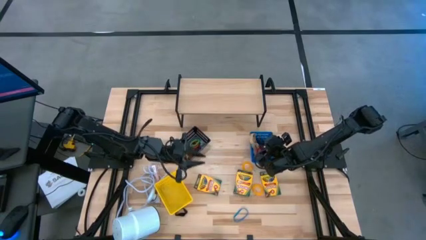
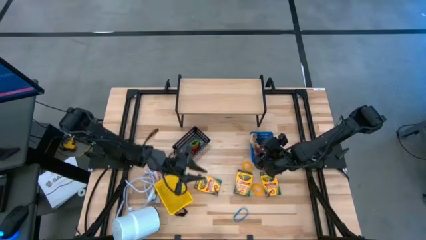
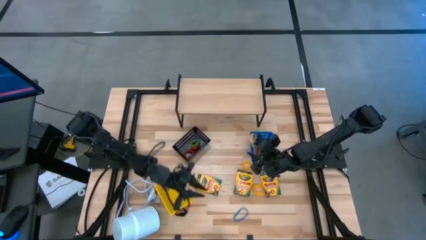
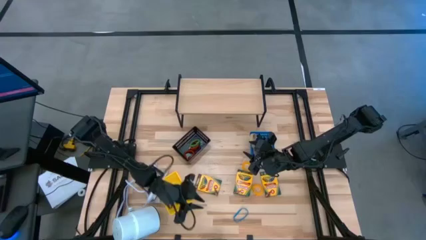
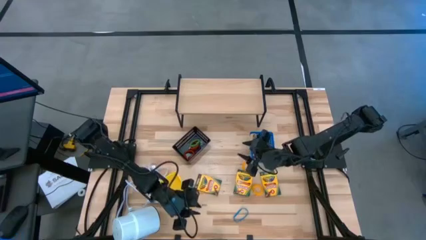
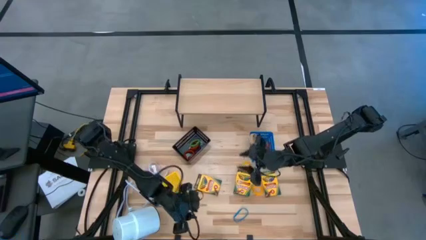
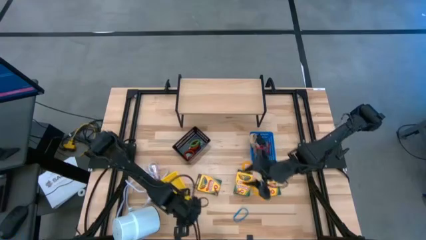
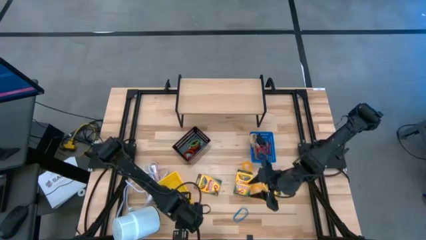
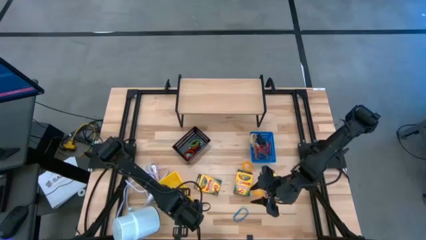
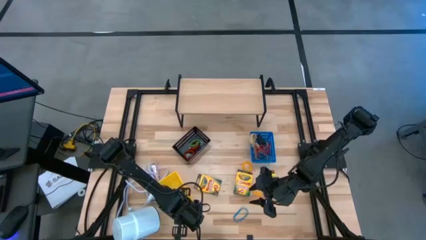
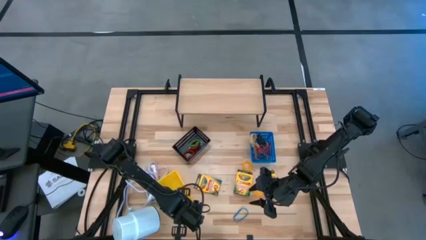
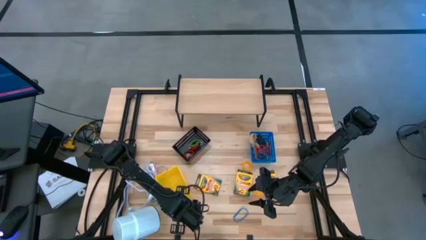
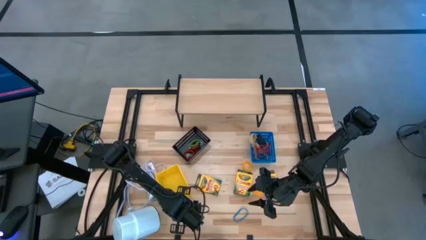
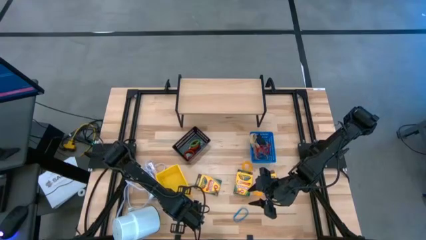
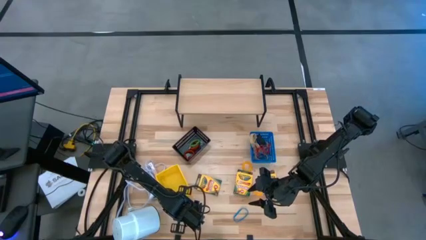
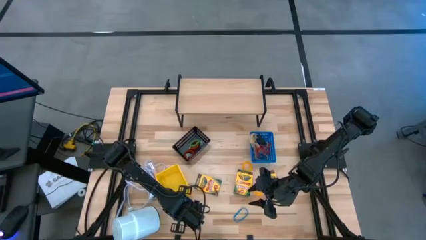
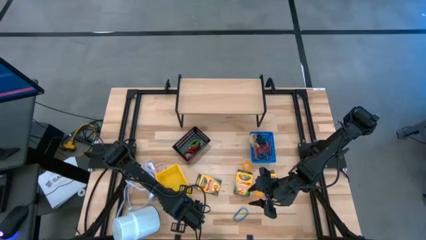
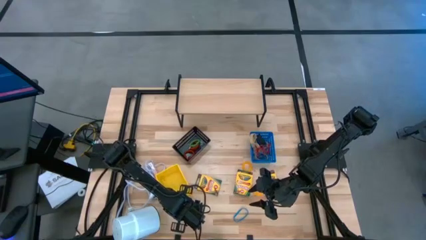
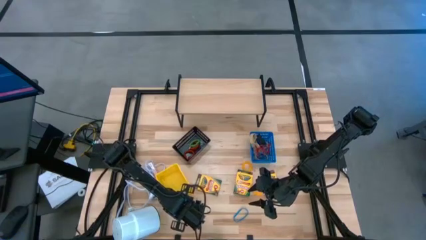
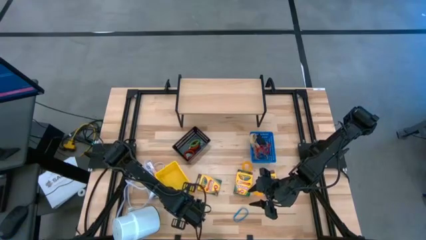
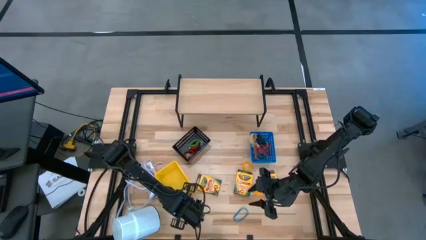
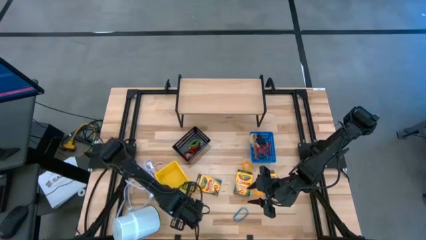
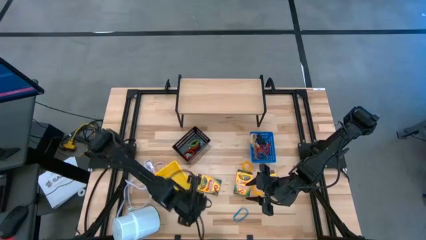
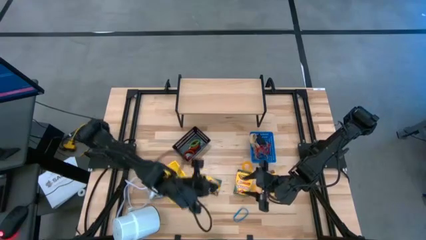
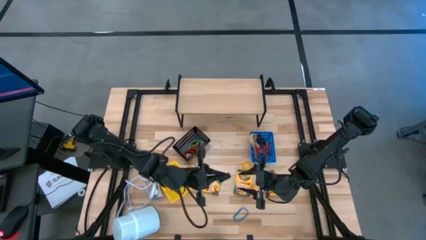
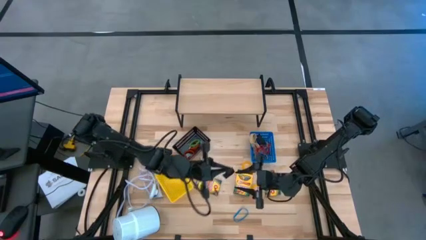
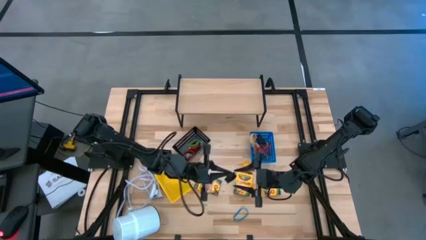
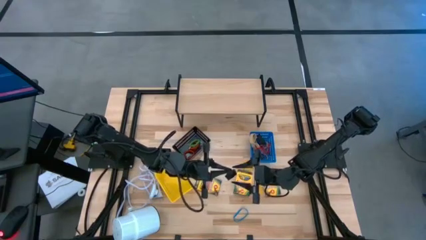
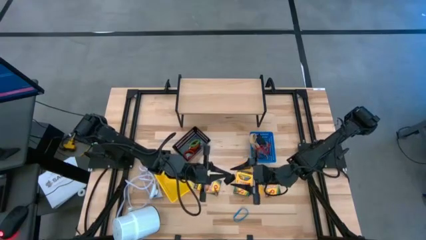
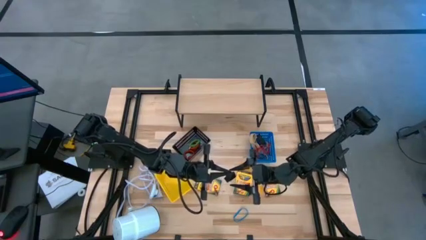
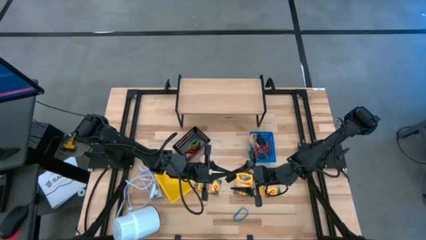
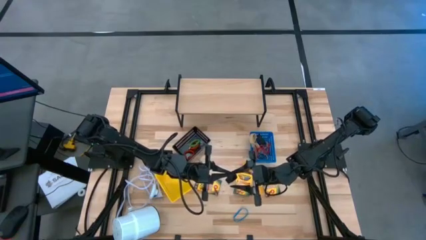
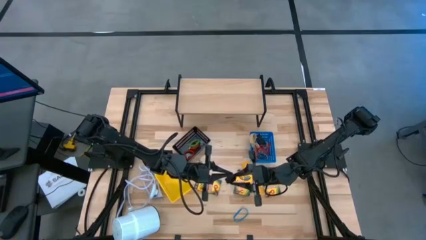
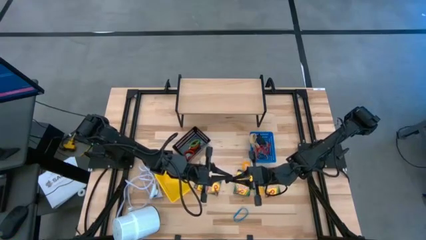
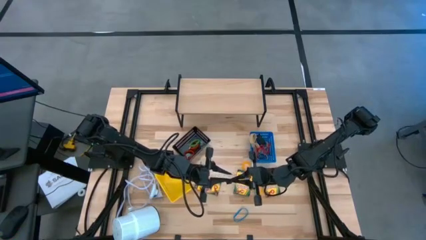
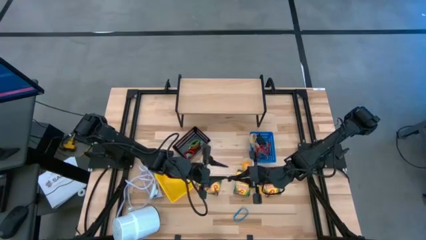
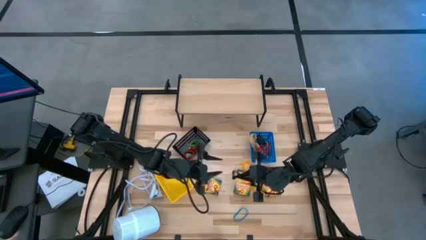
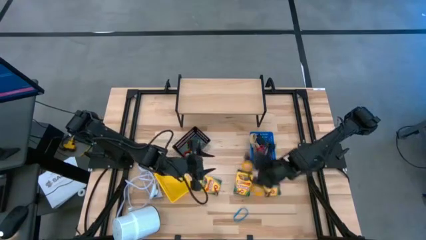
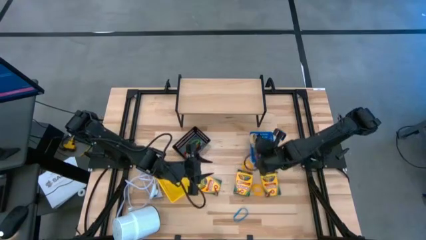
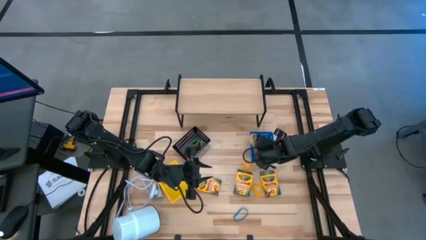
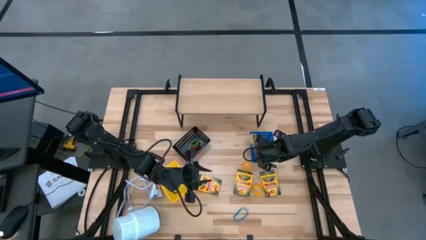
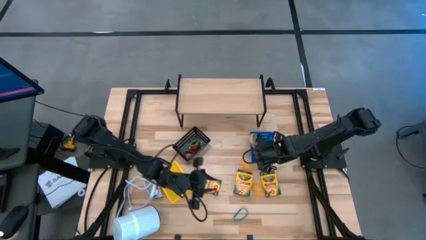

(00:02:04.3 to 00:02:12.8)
Task: Pick & Place Office Desk Supplies
Put the black rubber band into the blue bin

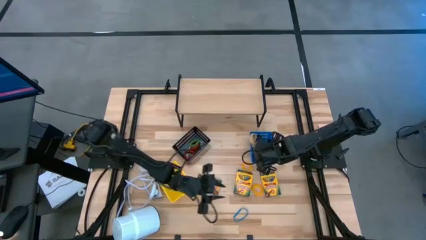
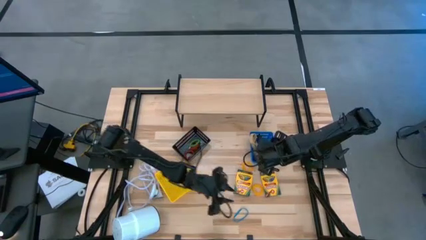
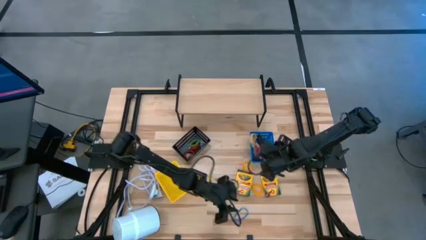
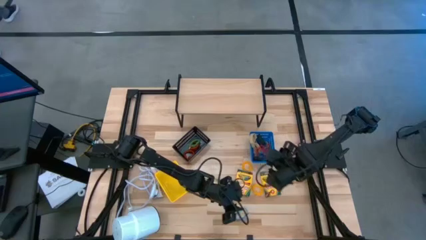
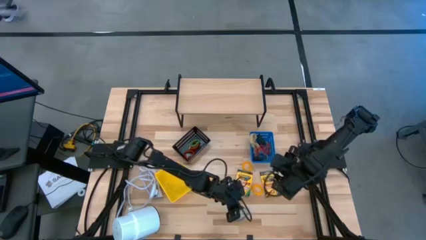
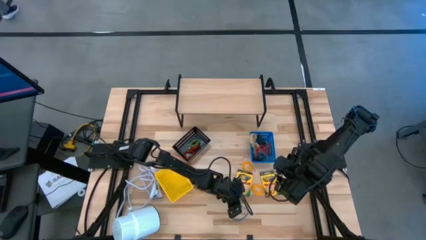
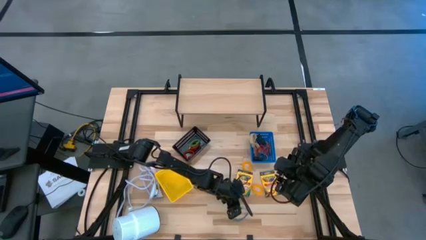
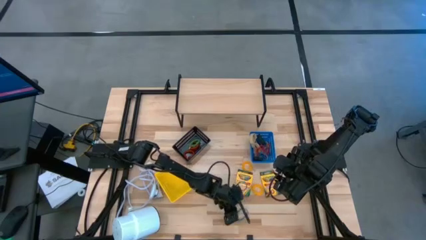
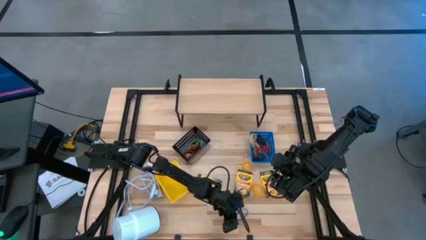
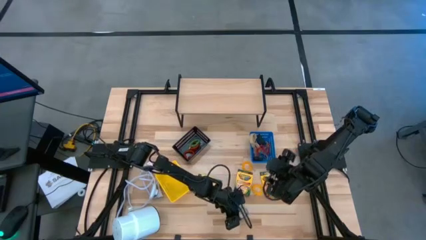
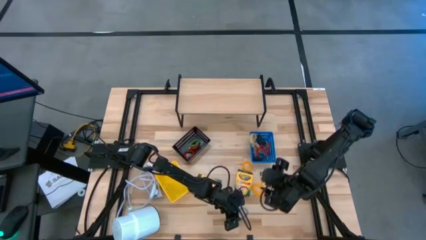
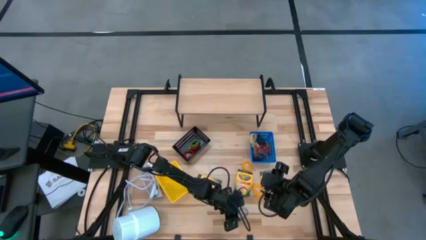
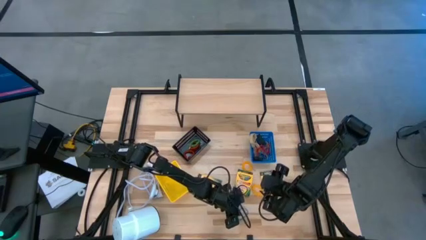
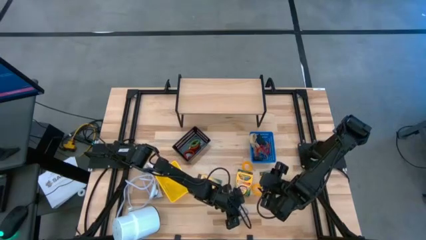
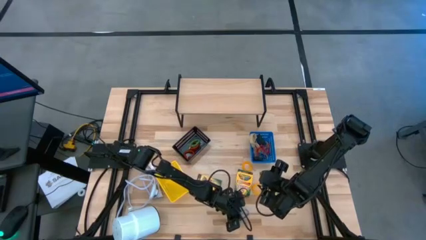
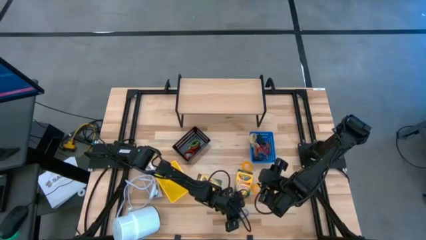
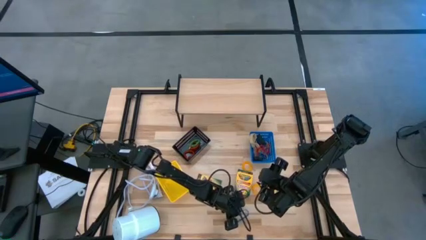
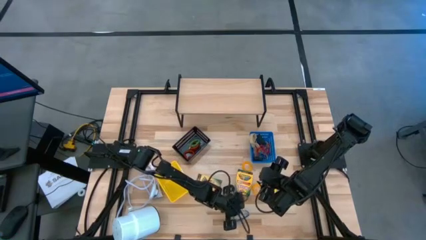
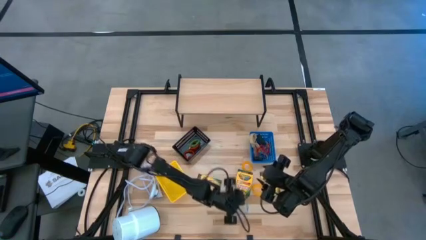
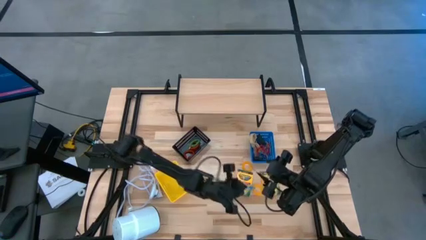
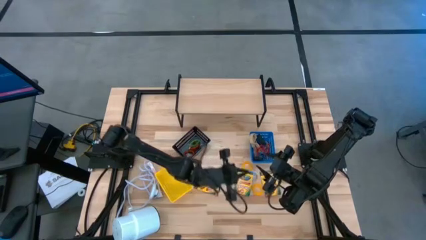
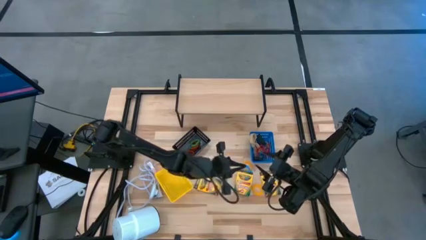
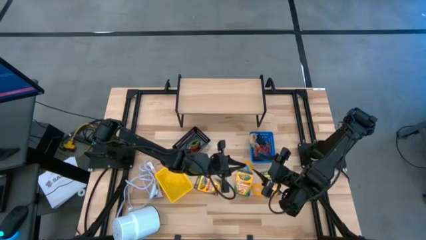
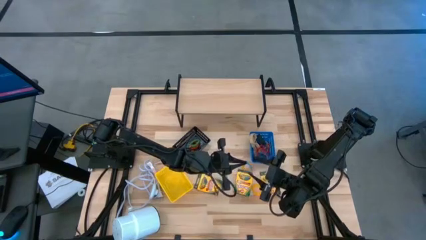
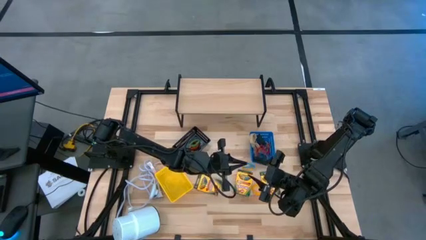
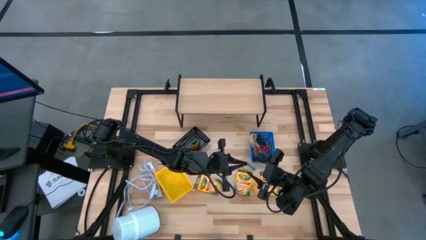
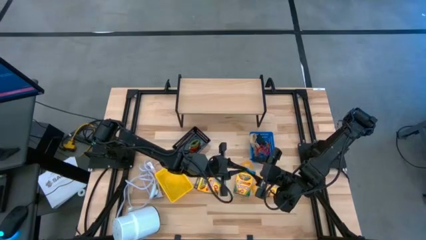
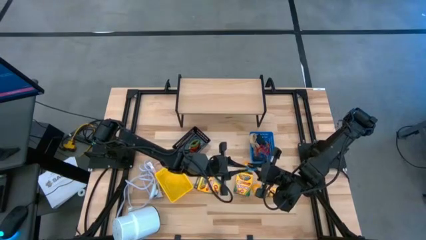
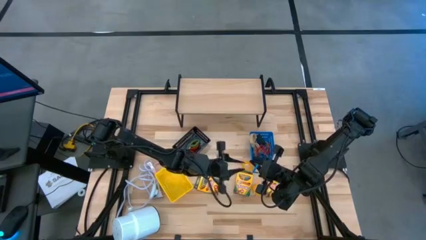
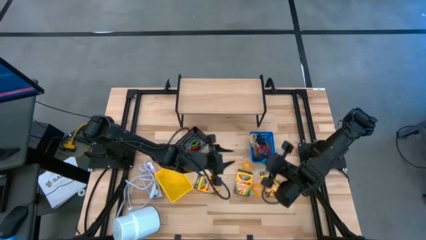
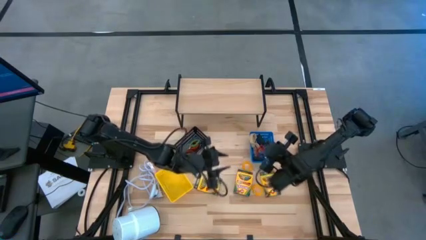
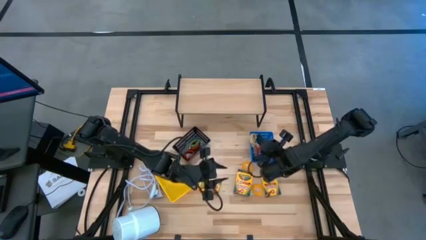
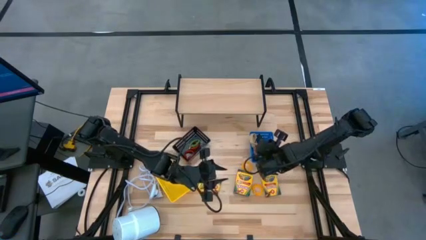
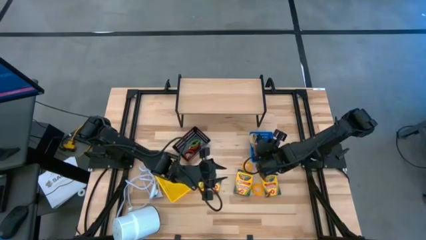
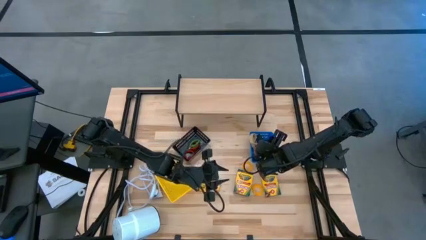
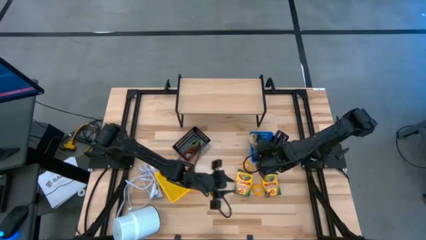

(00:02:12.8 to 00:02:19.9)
Put the blue rubber band into the blue bin

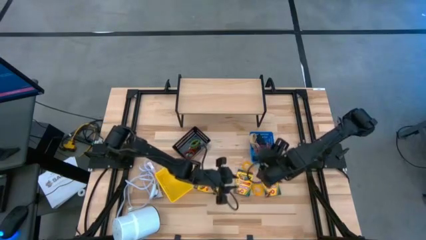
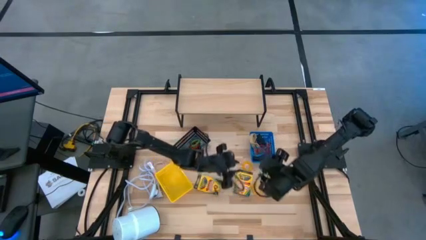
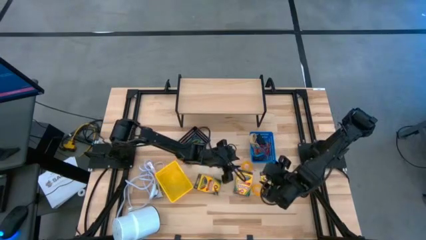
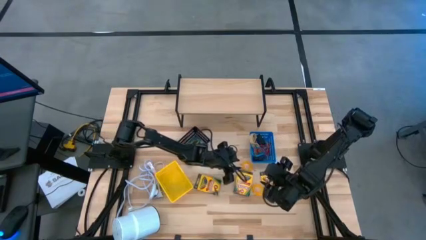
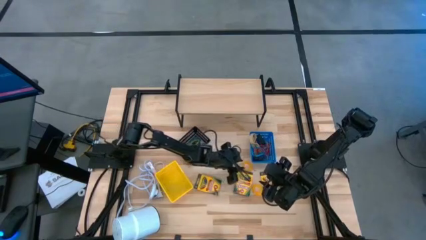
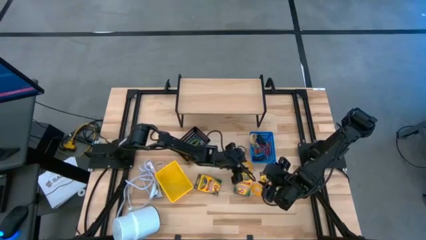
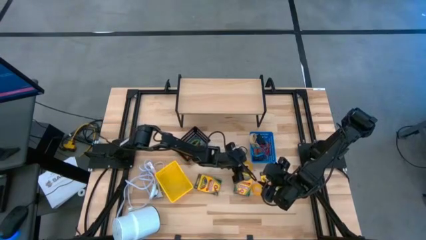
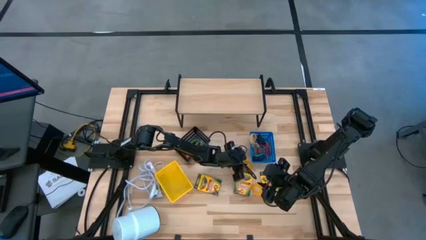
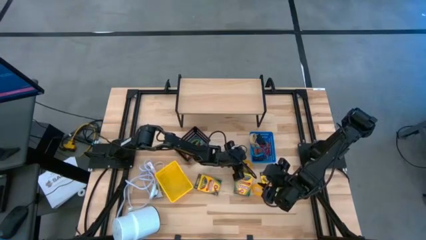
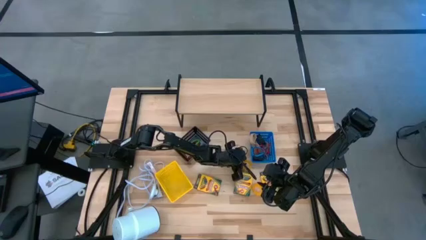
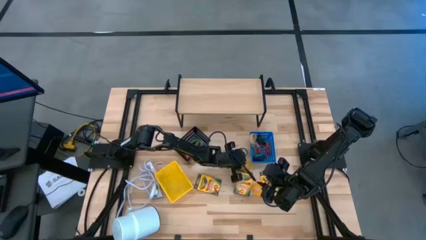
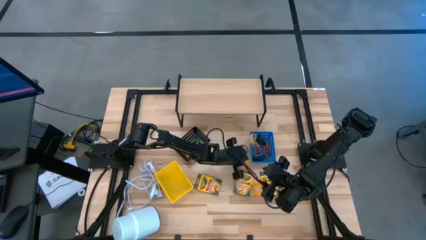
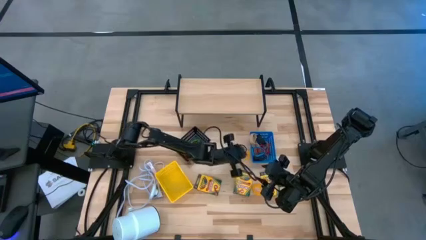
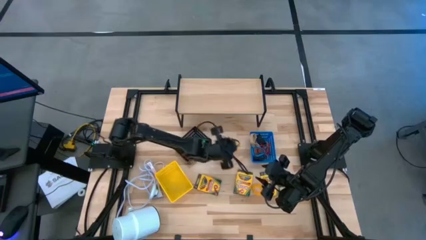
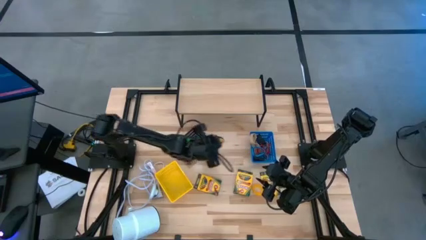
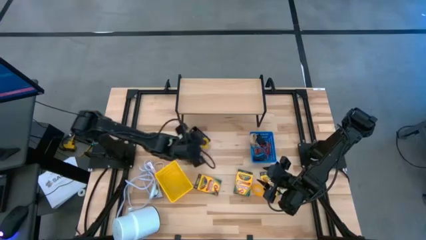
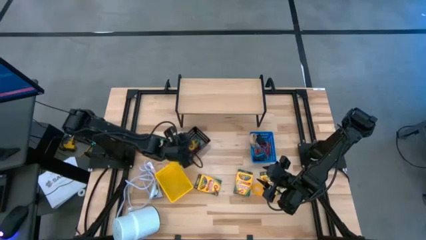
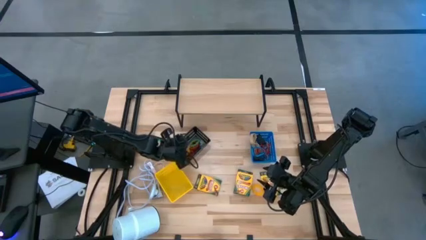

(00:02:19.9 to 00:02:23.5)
Put the yellow spring keychain into the black bin
